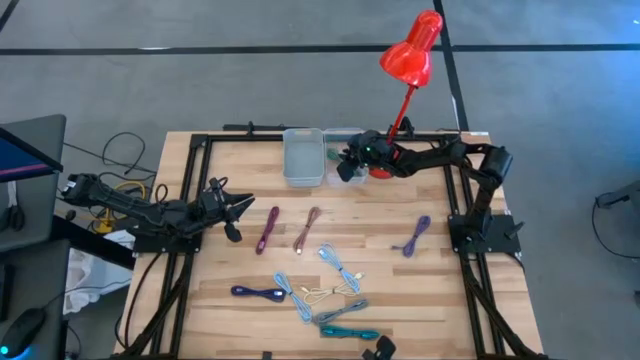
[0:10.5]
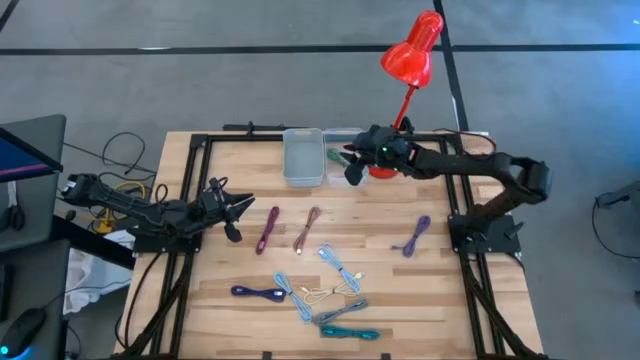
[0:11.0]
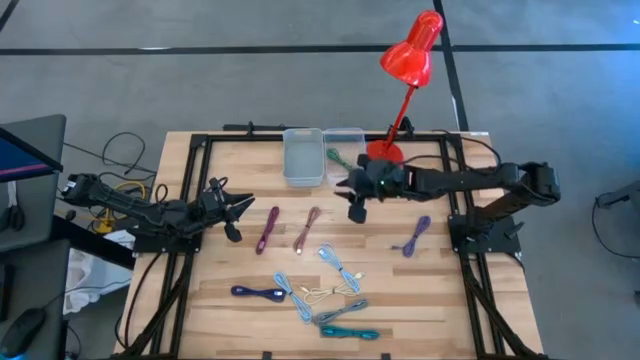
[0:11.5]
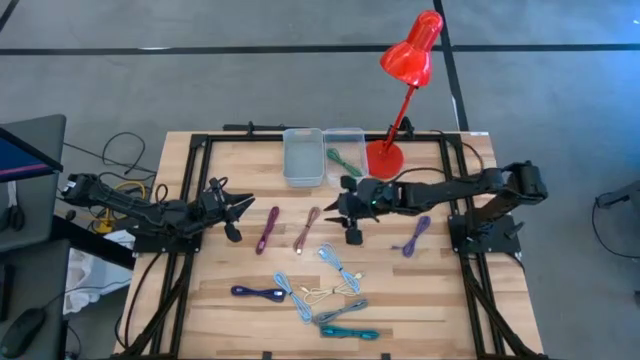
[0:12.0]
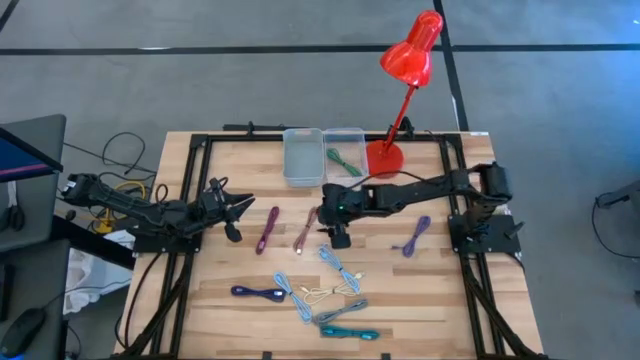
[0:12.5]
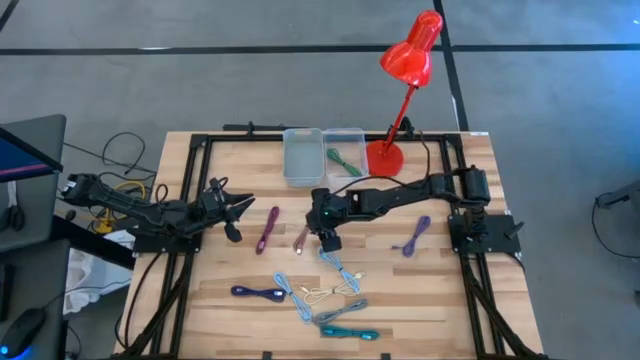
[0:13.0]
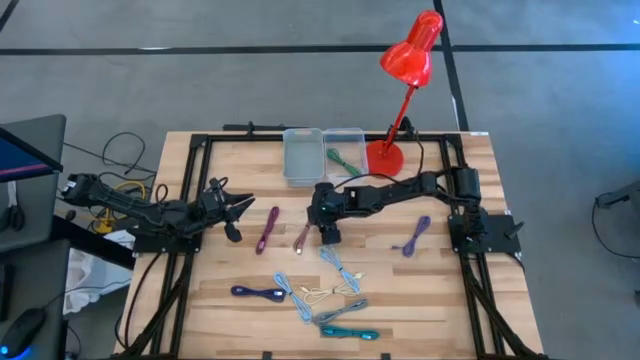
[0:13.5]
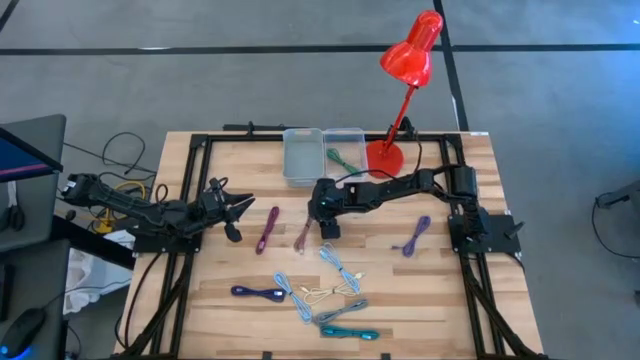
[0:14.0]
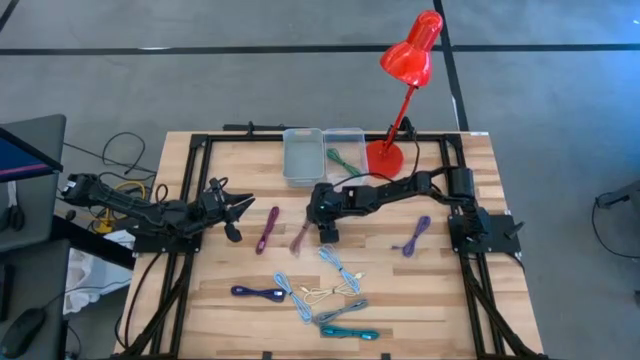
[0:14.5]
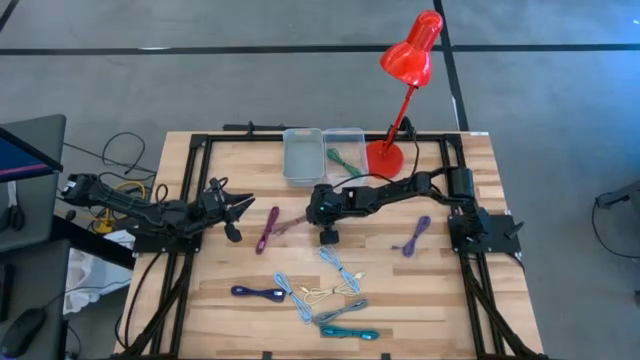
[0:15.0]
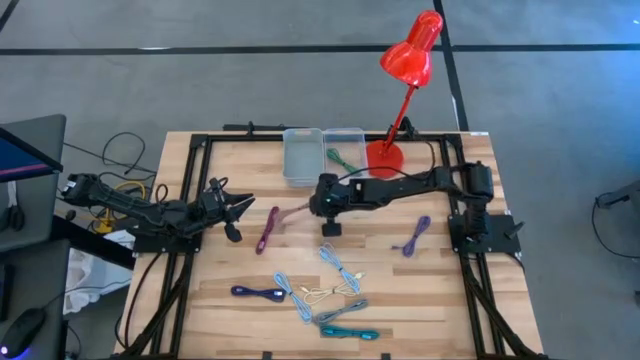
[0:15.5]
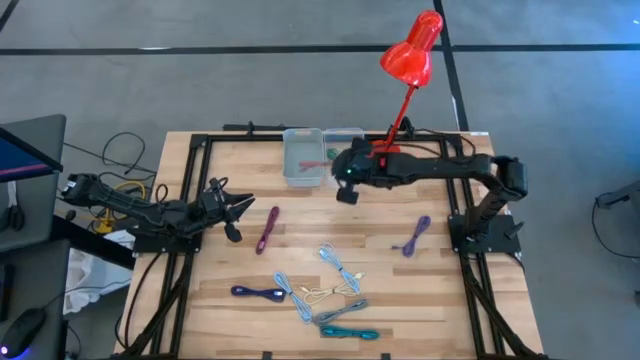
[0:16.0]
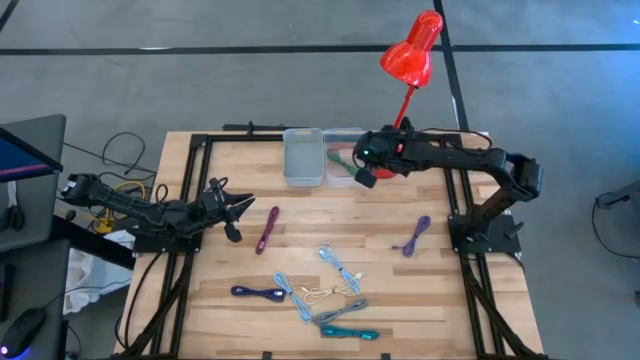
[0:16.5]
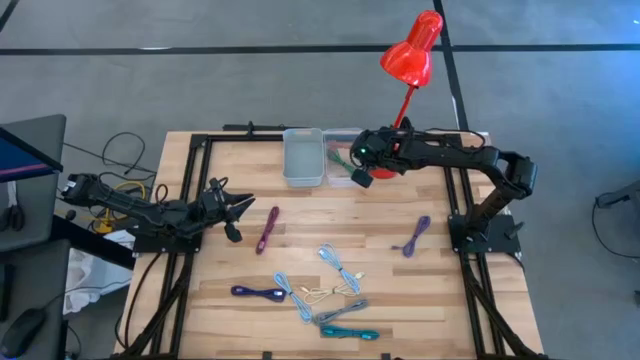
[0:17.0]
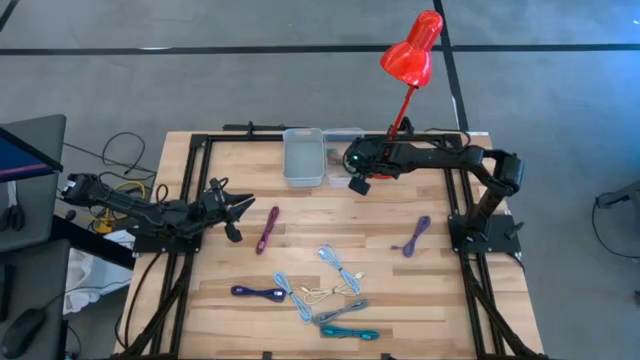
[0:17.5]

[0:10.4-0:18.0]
Task: Pick & Place USB Port
Put the pink charger cable into the transparent bin

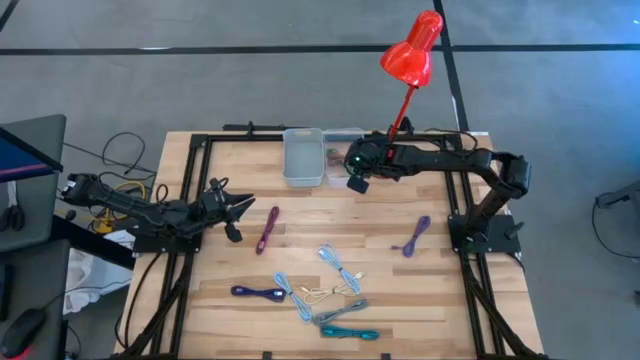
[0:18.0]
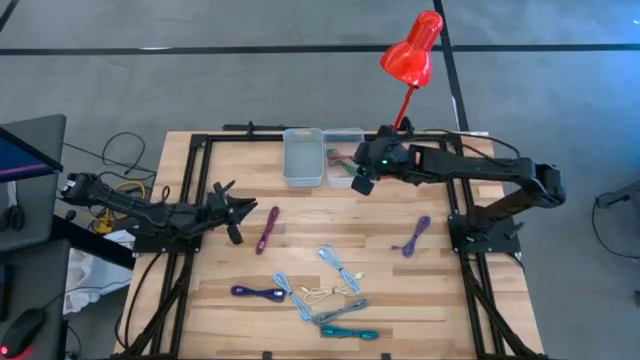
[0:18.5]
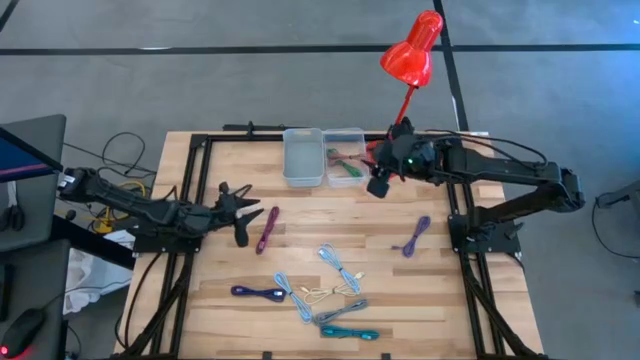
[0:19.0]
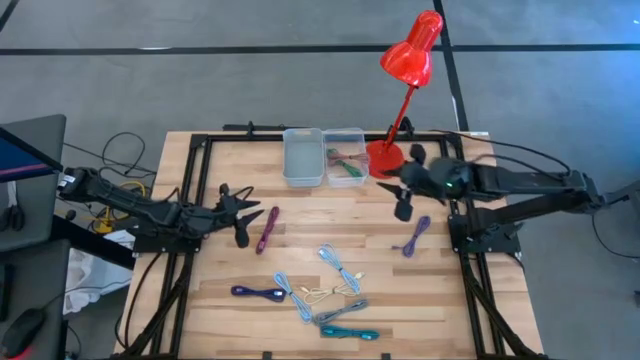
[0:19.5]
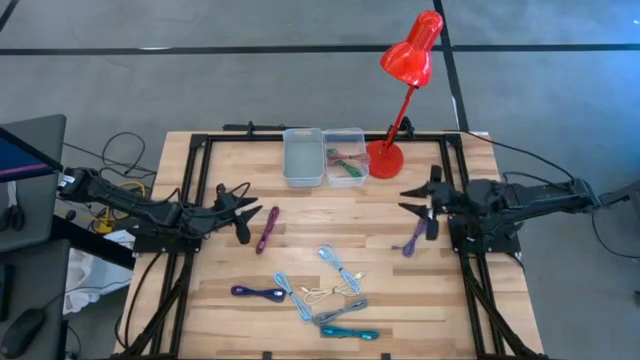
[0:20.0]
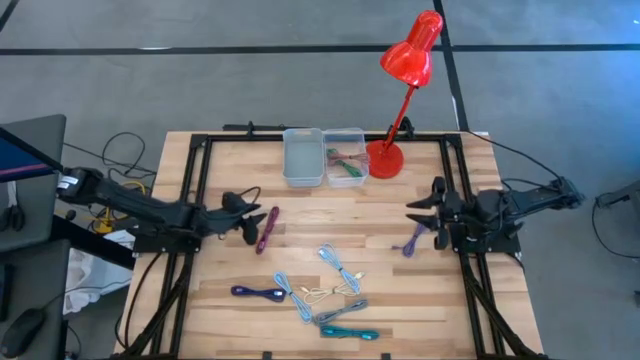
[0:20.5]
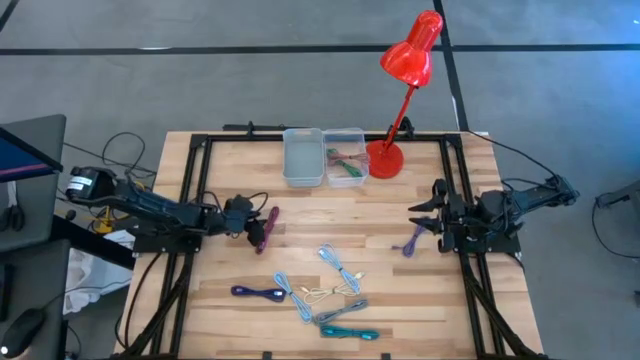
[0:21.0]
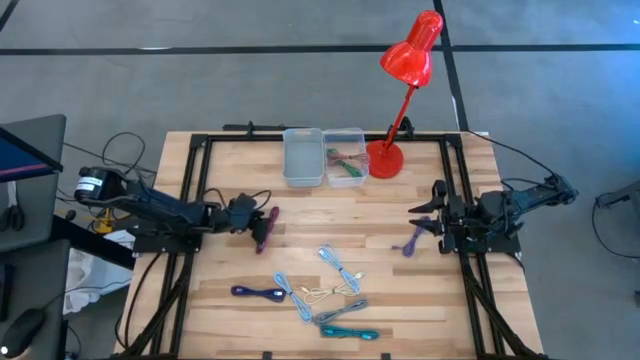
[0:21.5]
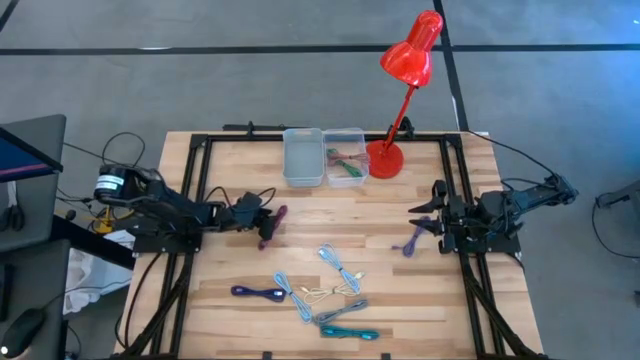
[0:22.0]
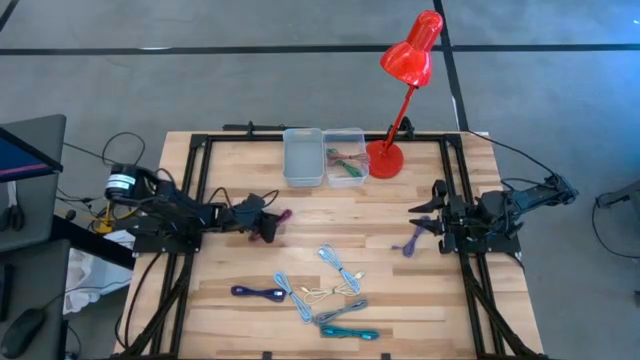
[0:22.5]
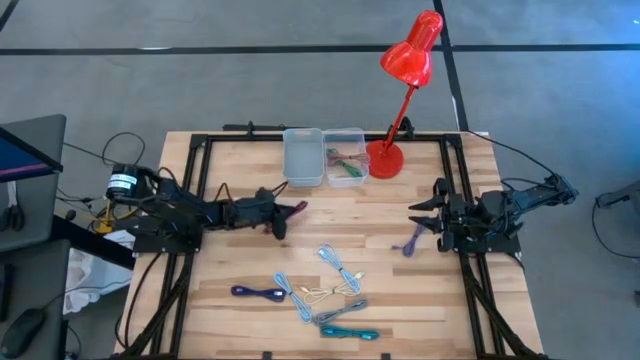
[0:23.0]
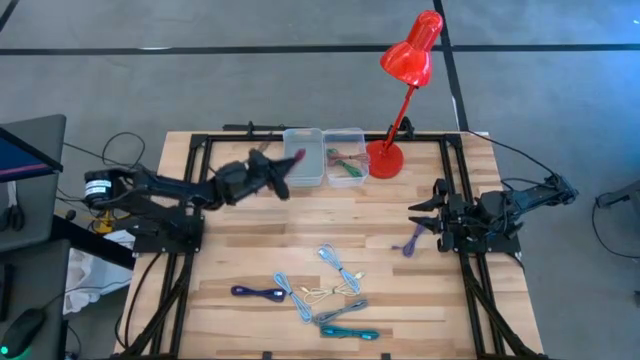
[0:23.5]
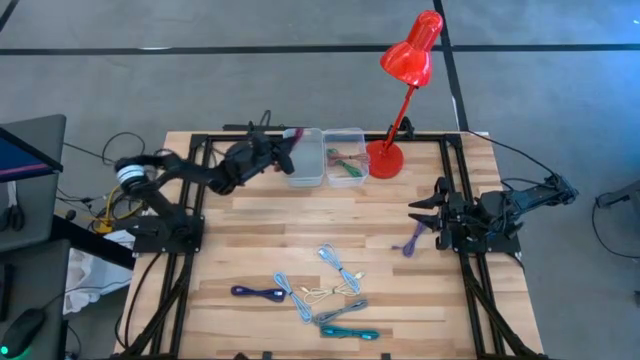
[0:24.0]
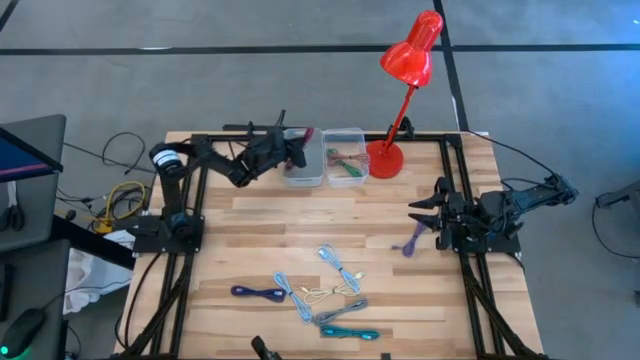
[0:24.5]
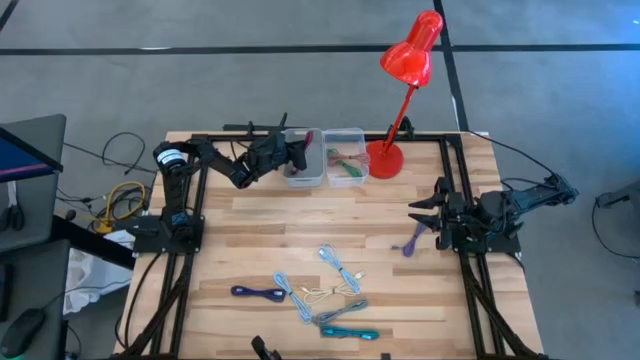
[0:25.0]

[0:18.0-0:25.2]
Put the black and pink charger cable into the gray bin

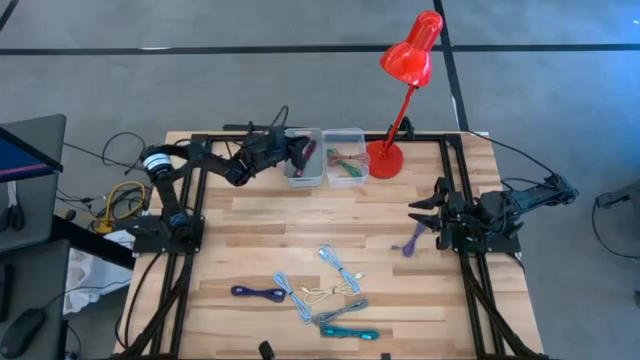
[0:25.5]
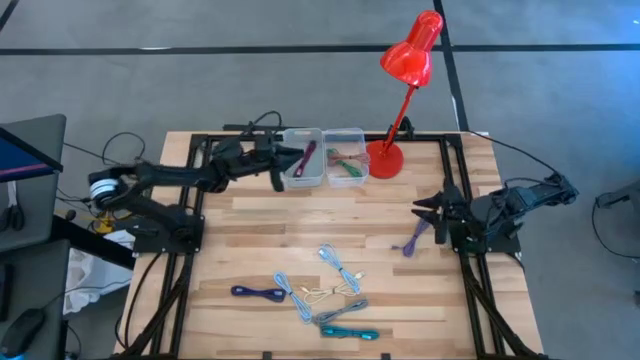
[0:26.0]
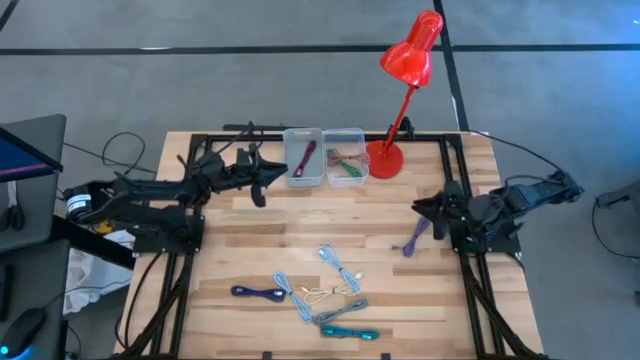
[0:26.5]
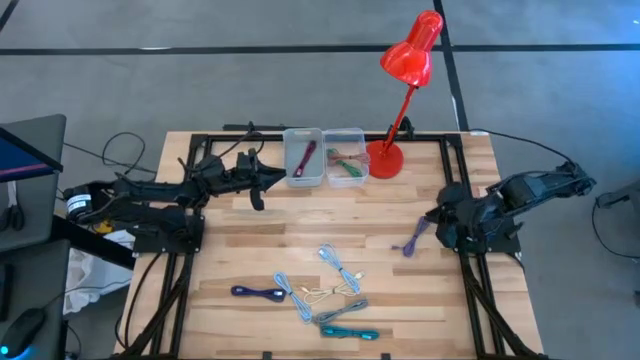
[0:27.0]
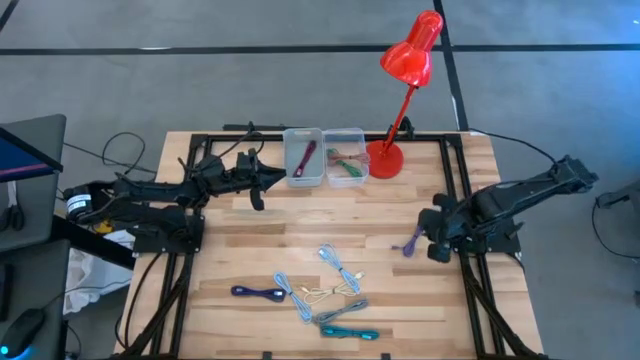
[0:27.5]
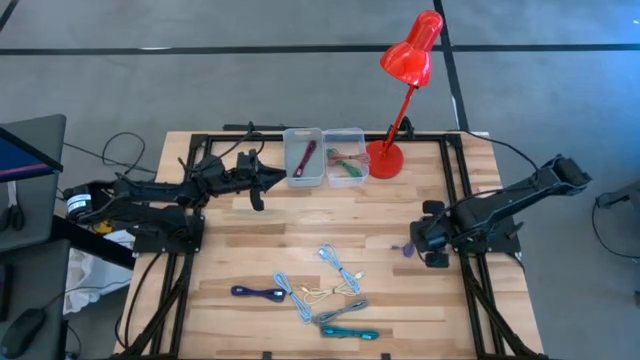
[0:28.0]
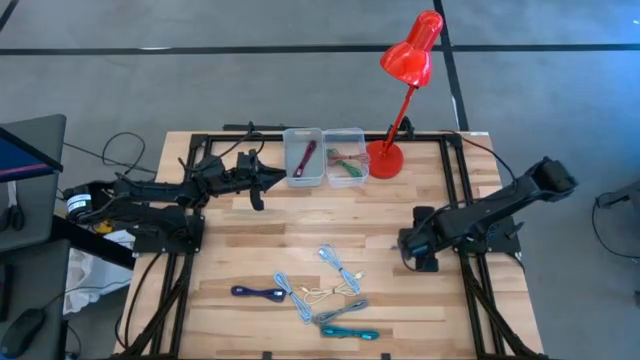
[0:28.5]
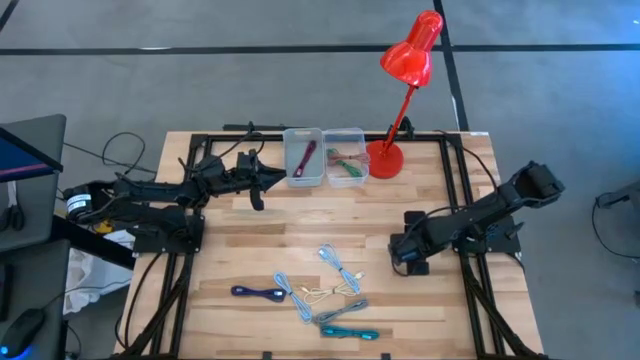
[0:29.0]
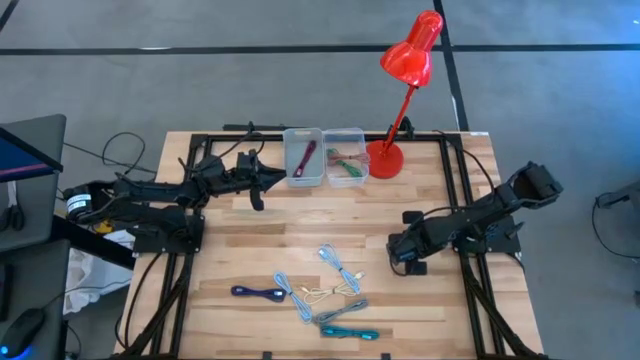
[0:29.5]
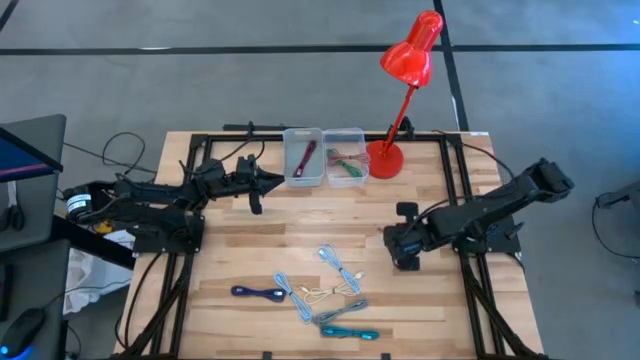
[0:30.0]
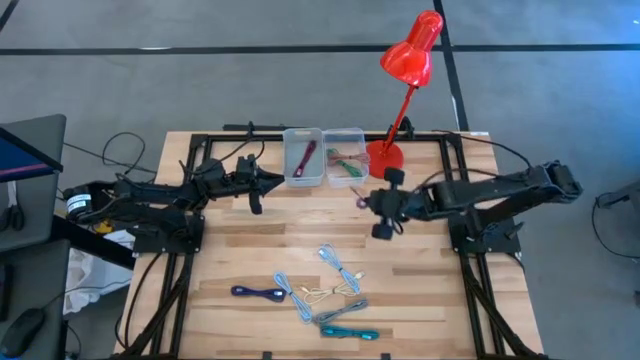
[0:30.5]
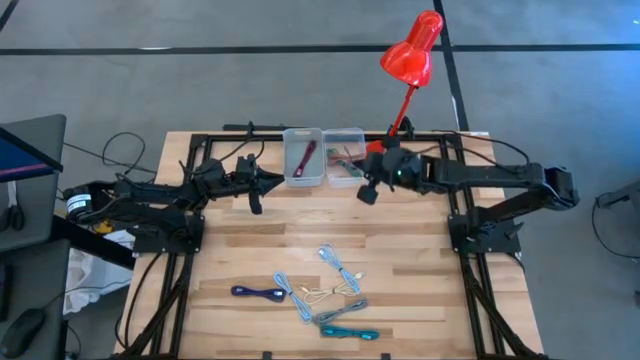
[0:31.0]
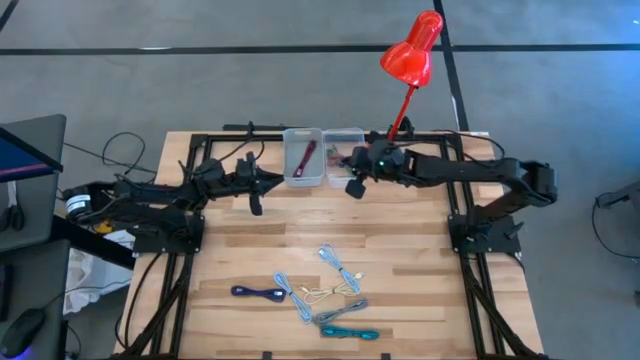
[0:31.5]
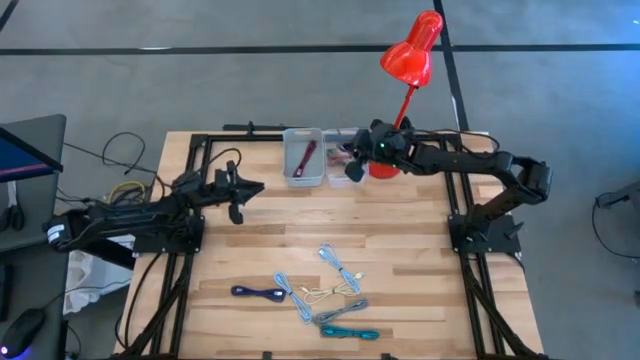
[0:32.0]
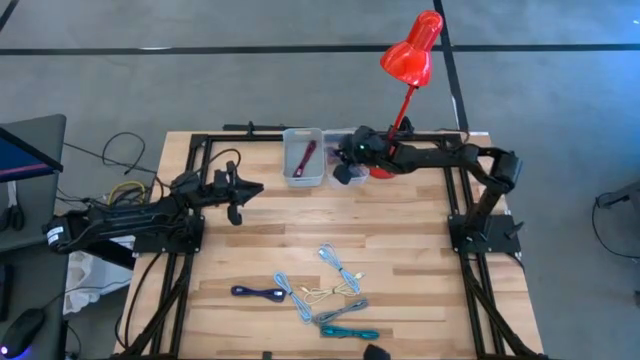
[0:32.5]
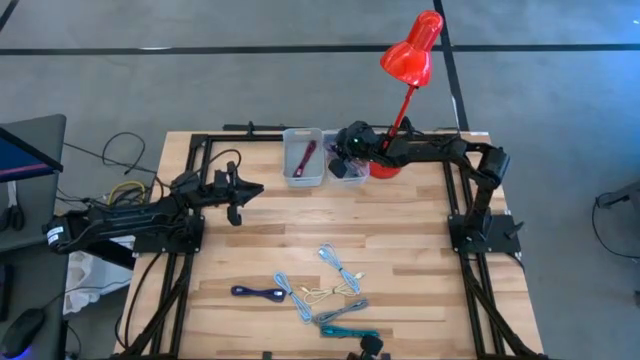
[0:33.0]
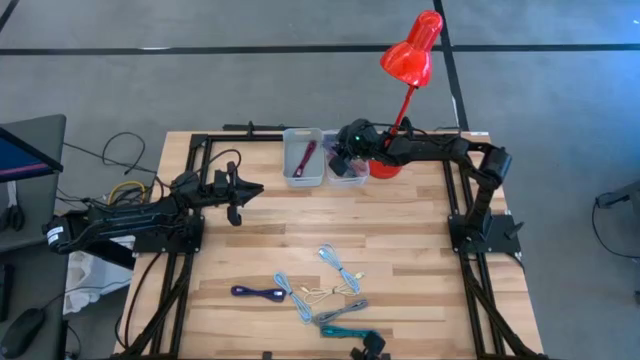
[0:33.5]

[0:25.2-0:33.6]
Put the purple charger cable into the transparent bin
